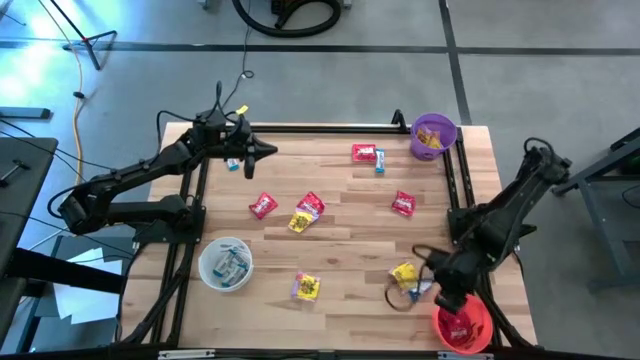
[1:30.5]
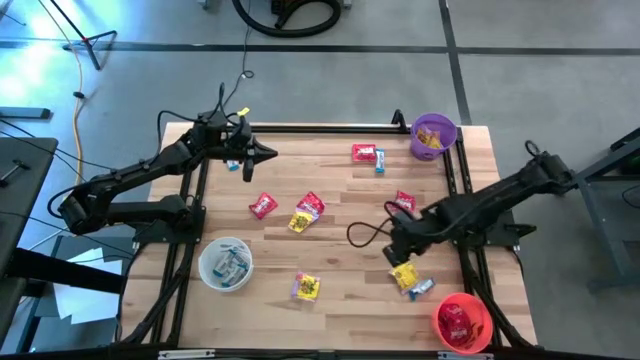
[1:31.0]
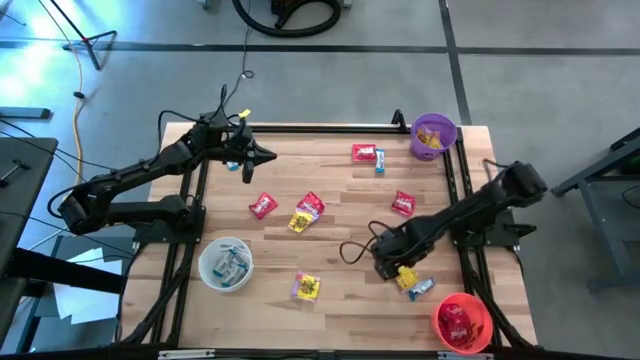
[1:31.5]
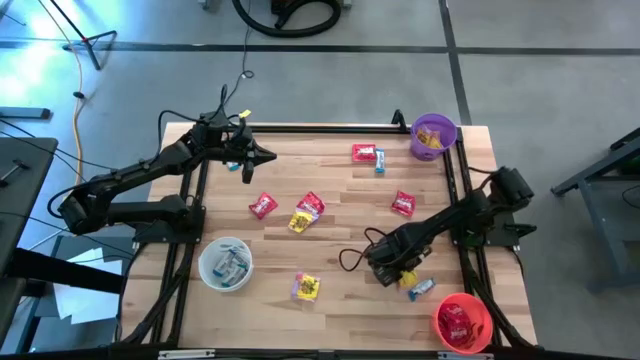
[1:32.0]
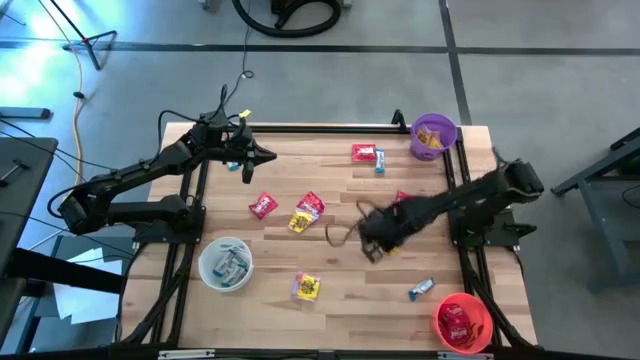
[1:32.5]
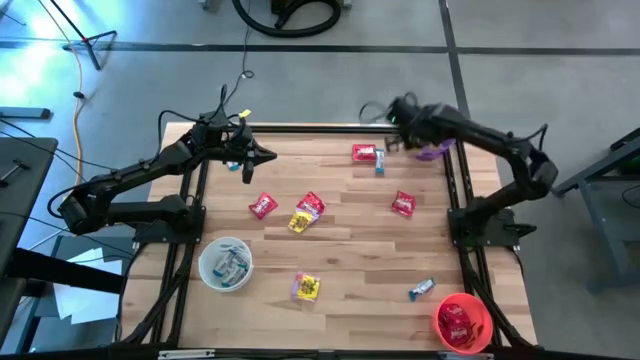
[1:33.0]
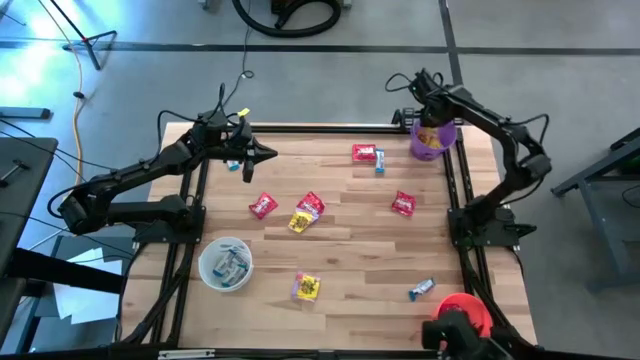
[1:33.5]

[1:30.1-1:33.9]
Task: Sort candy
Put the yellow candy into the purple bin

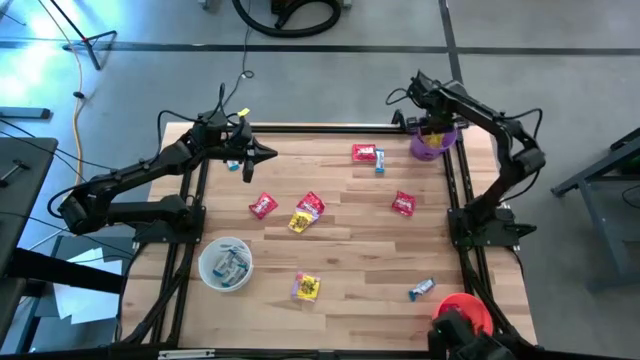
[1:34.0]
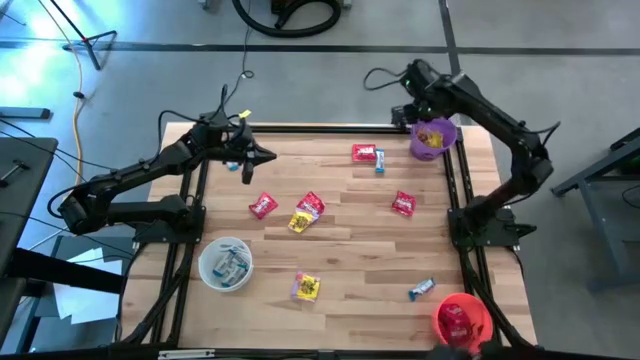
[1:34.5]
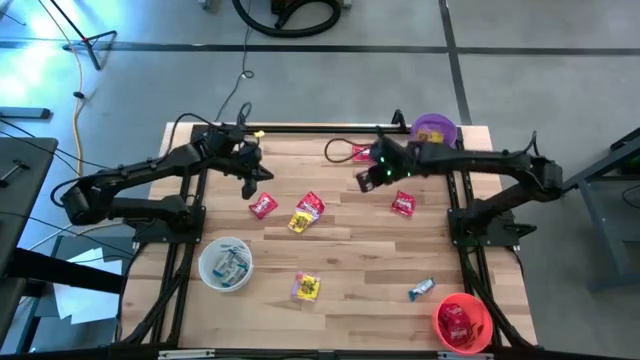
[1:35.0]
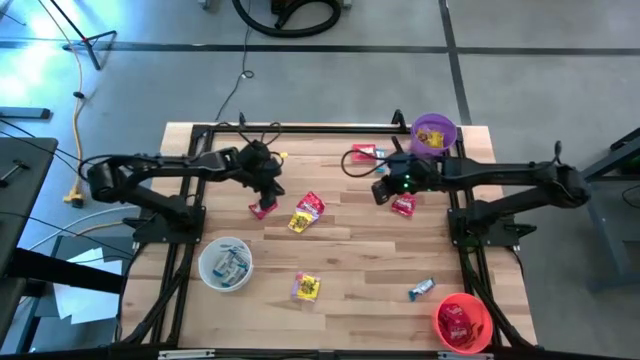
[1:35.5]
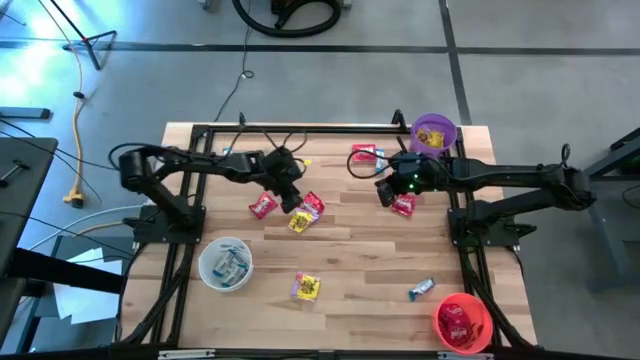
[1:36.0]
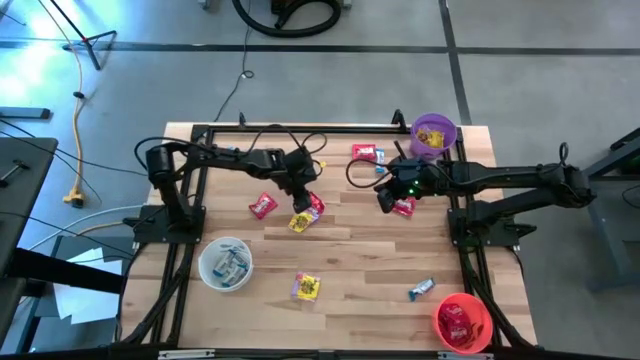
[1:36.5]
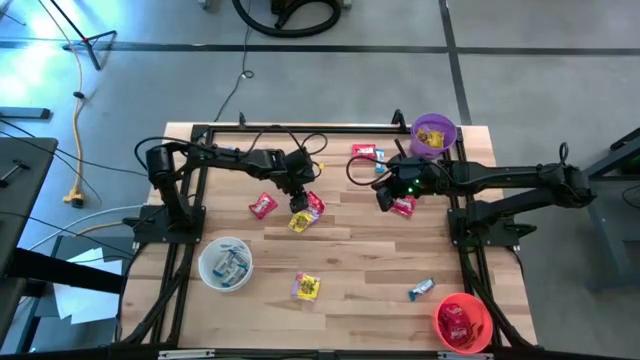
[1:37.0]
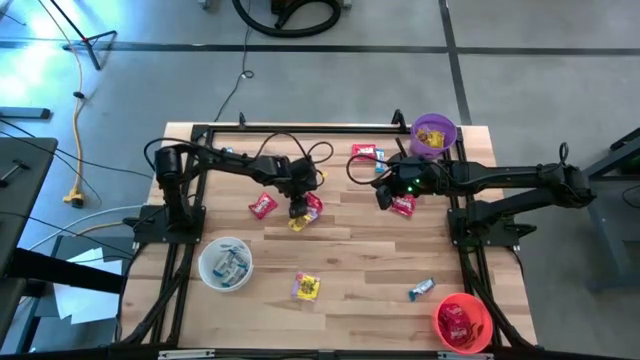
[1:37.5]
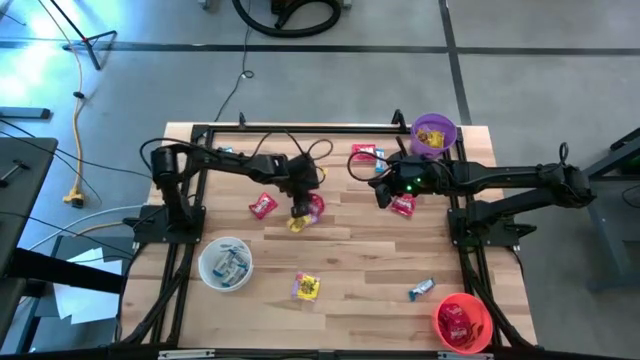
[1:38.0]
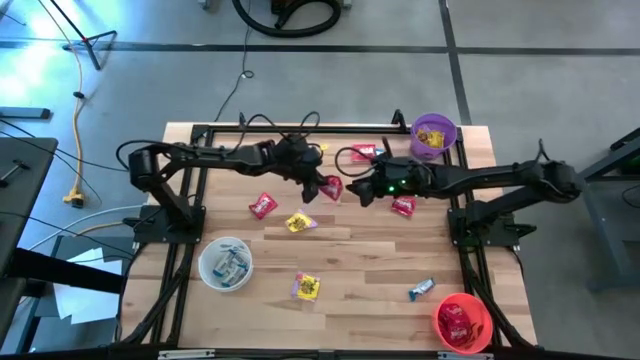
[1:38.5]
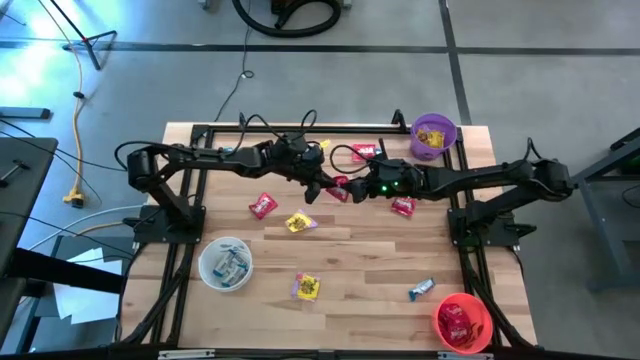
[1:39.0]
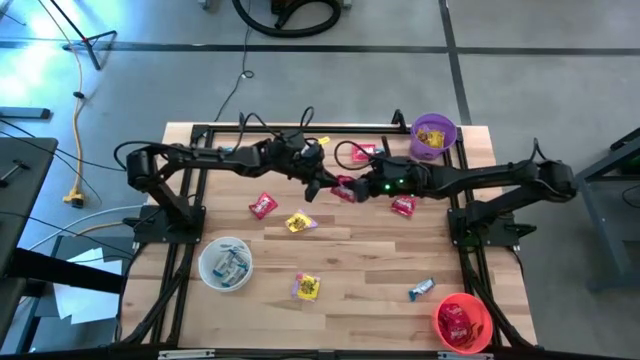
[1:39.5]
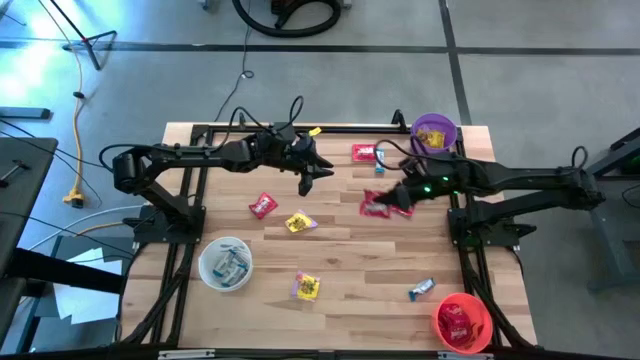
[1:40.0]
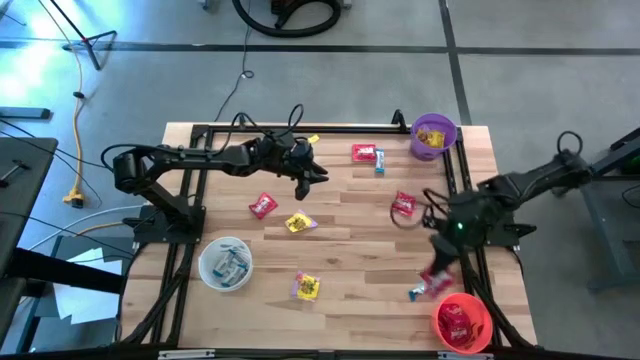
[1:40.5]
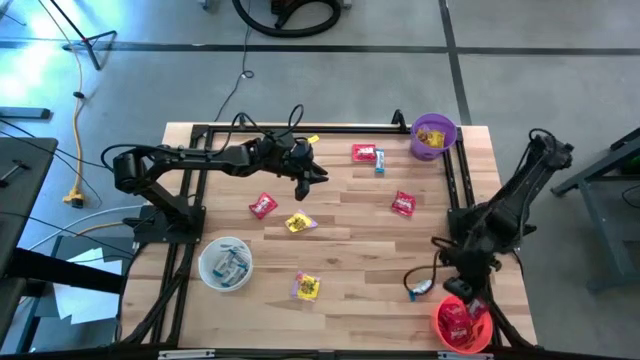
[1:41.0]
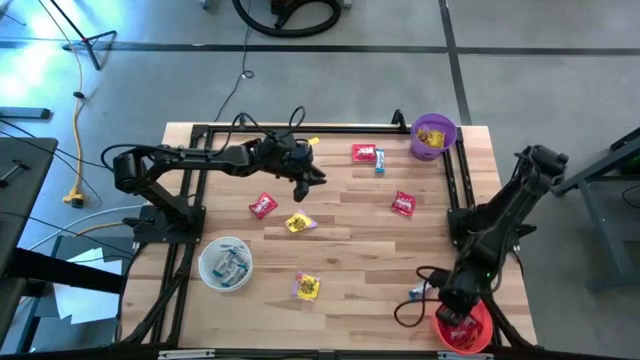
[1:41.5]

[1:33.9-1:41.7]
Put the red candy into the orange bin

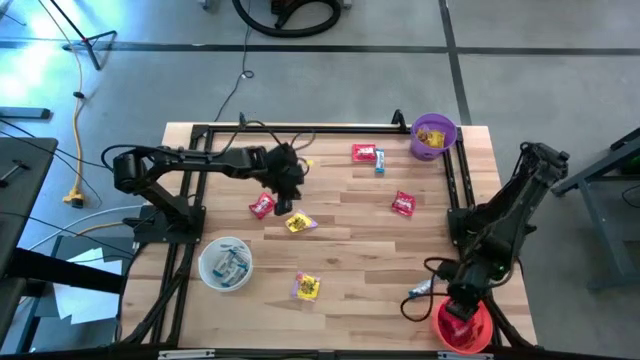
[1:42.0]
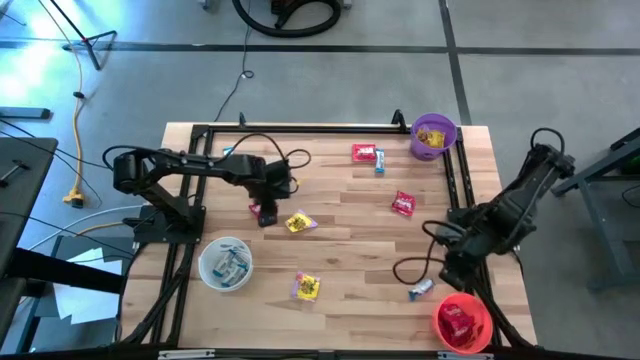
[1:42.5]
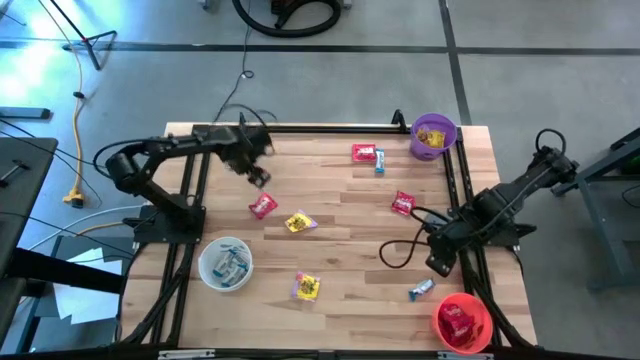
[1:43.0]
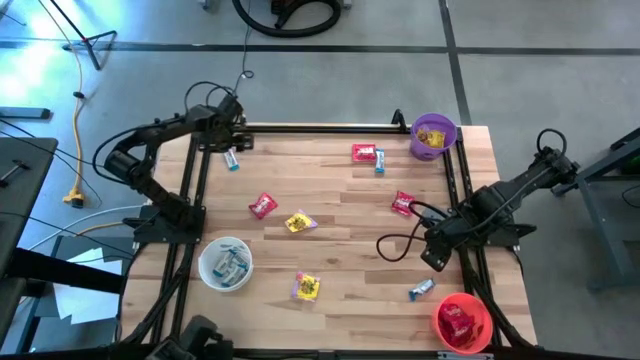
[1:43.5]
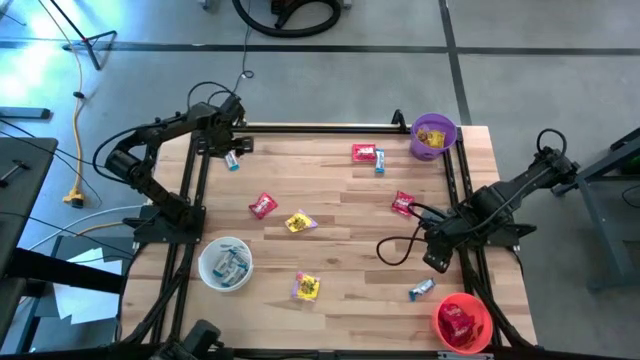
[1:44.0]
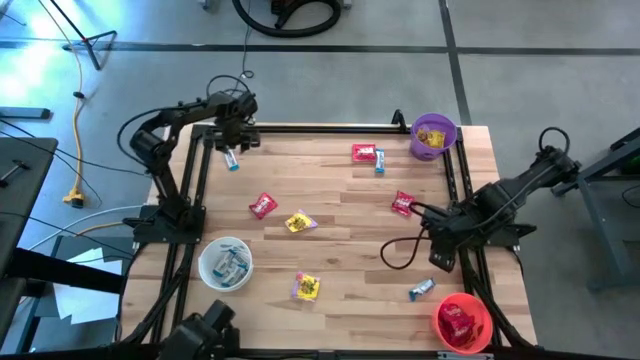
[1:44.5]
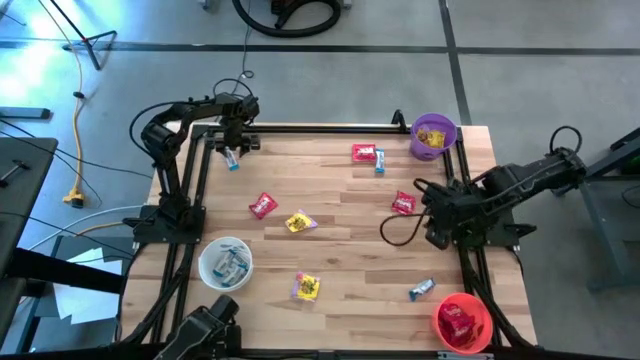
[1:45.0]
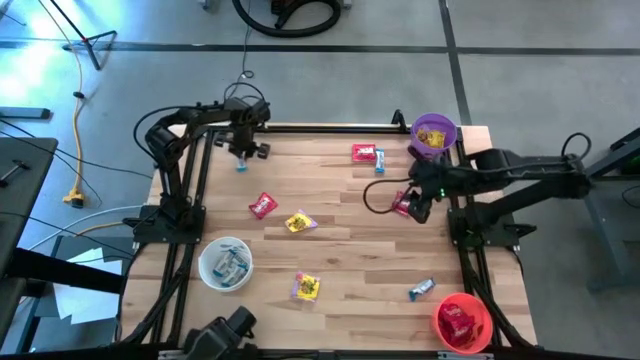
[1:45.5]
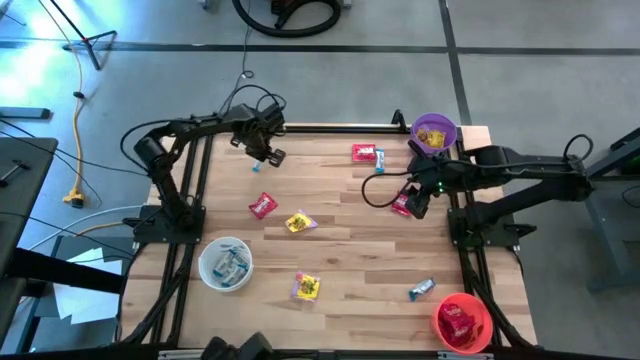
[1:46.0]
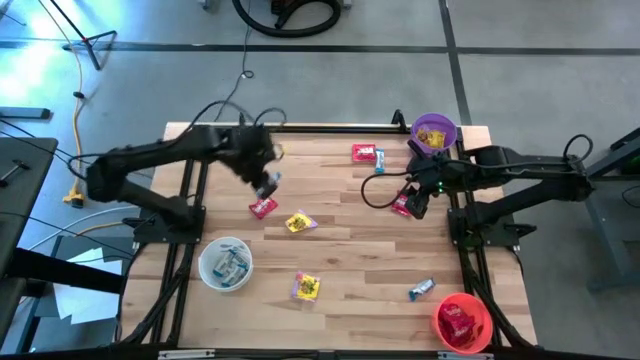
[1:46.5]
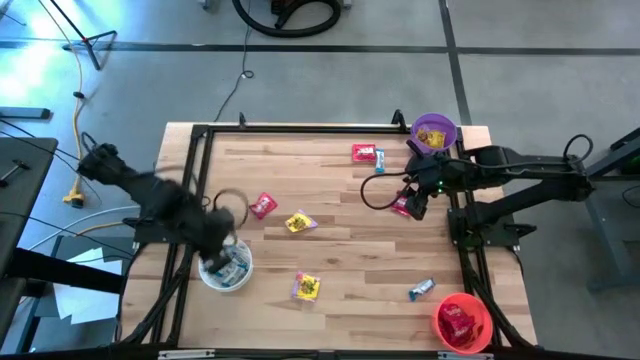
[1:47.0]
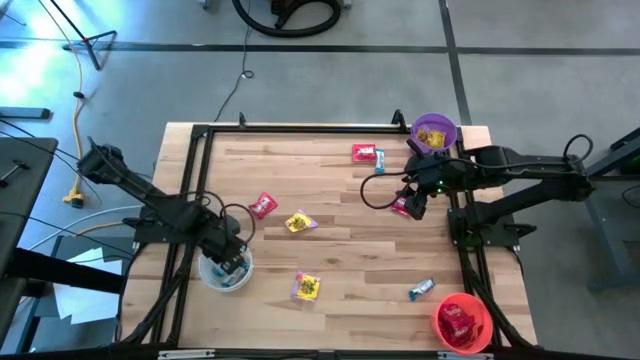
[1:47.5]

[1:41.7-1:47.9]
Put the white chocolate bar into the white bin

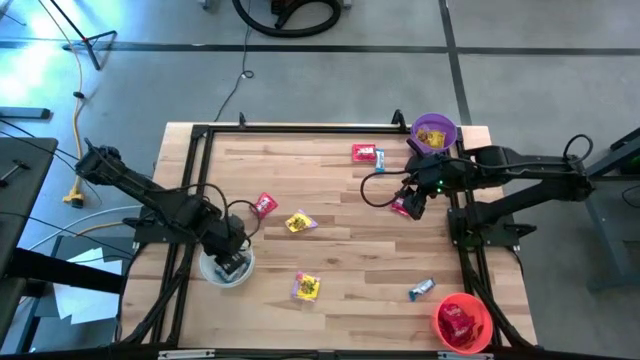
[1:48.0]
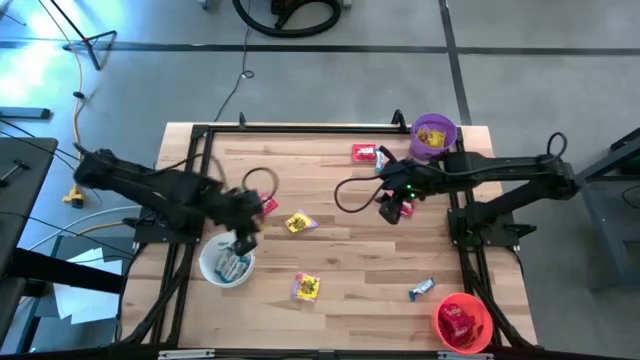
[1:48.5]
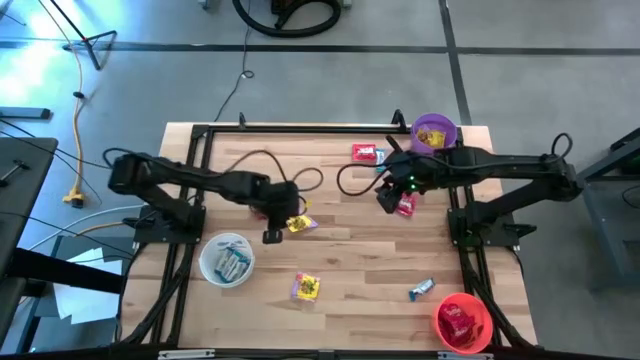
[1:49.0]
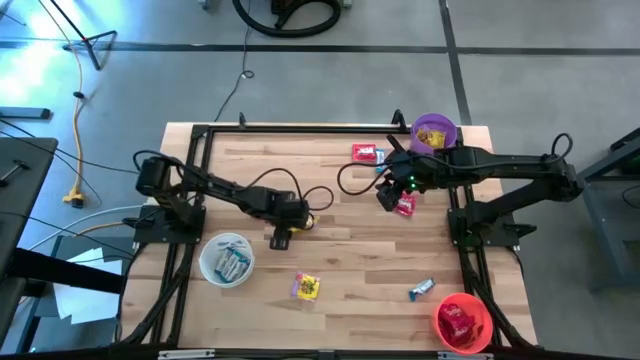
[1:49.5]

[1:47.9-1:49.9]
Put the yellow candy into the purple bin

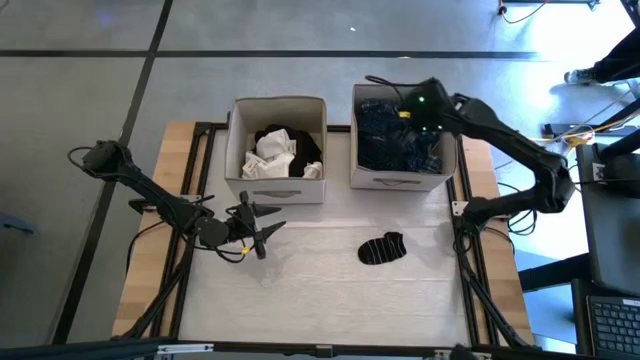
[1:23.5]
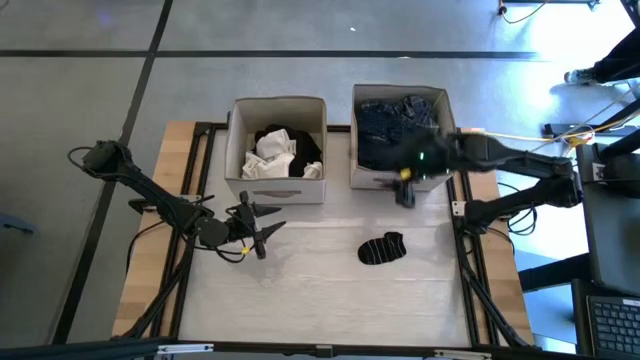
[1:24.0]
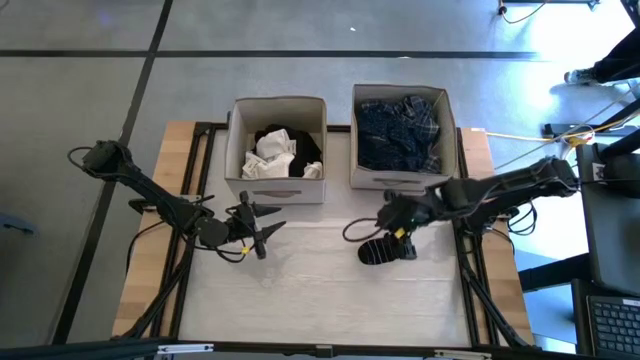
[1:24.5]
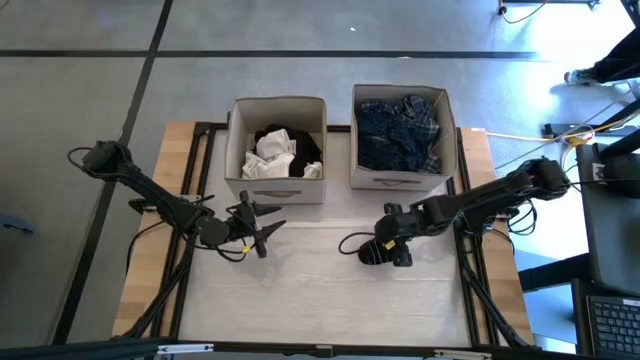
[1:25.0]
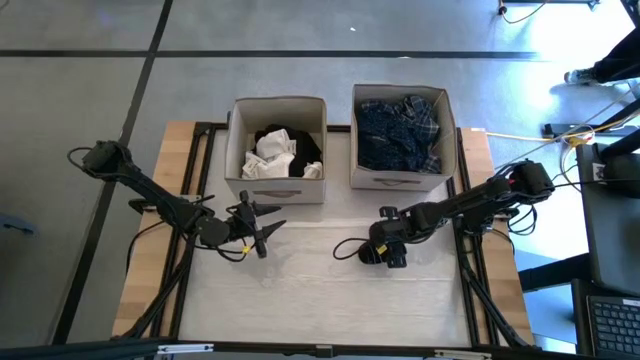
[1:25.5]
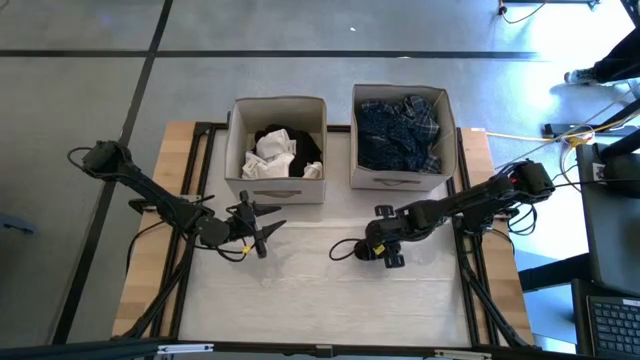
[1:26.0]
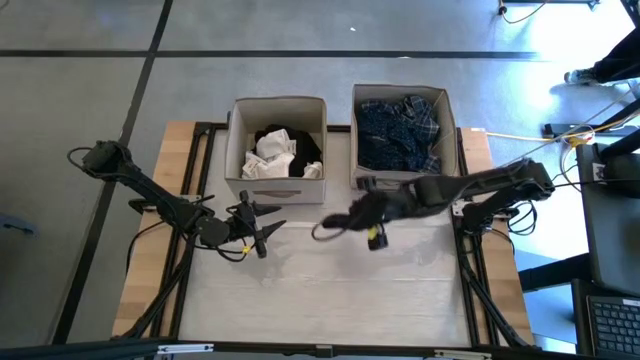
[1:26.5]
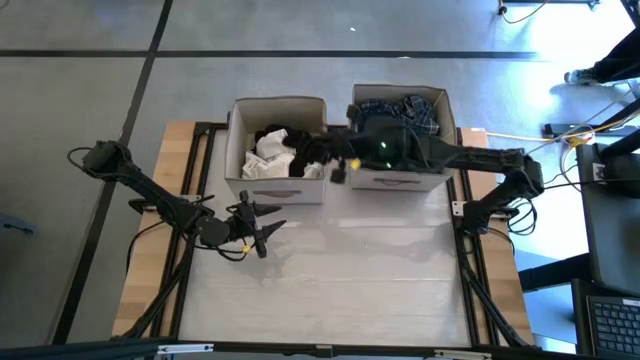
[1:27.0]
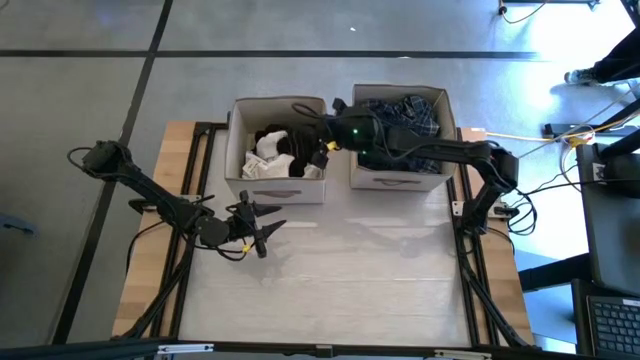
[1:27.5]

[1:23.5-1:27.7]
Task: Sort clothes
Put the black striped sock into the right laundry organizer
